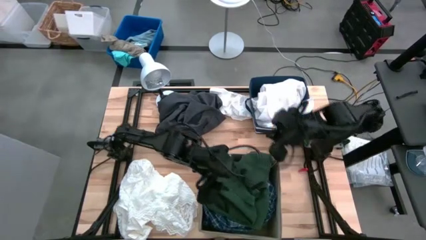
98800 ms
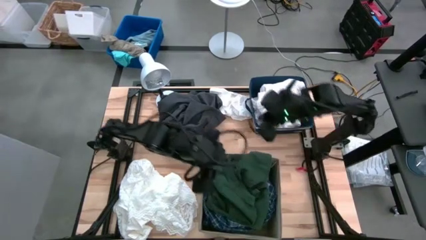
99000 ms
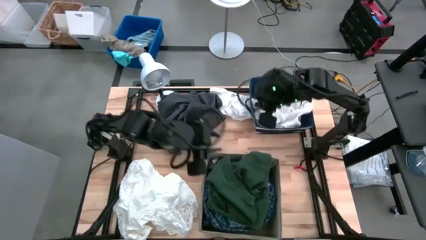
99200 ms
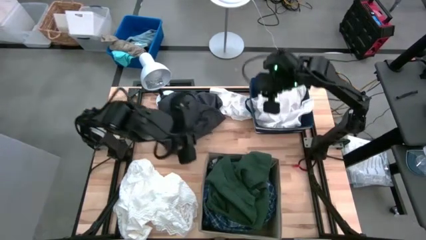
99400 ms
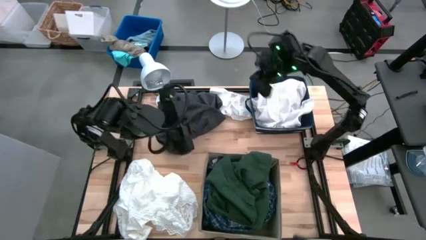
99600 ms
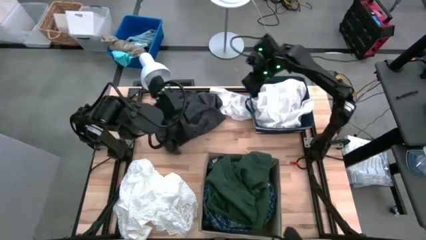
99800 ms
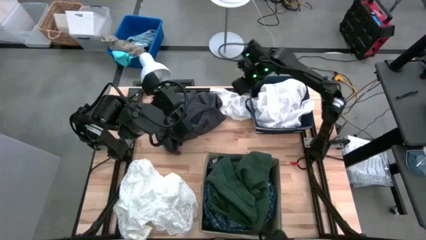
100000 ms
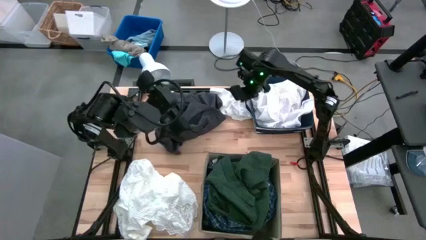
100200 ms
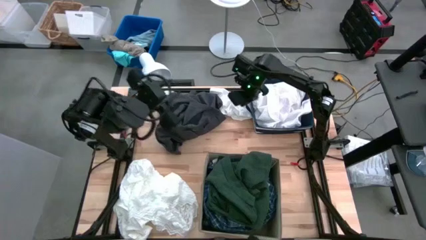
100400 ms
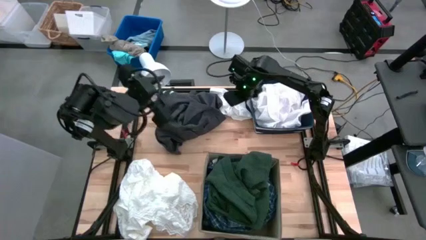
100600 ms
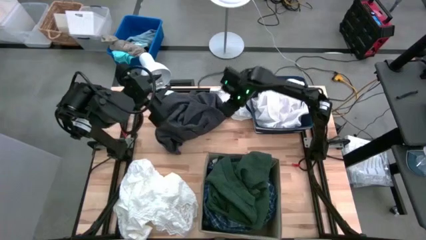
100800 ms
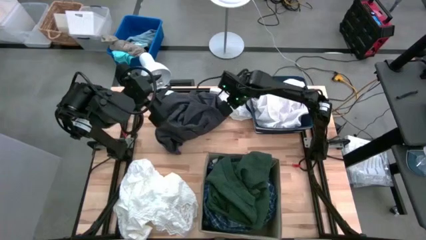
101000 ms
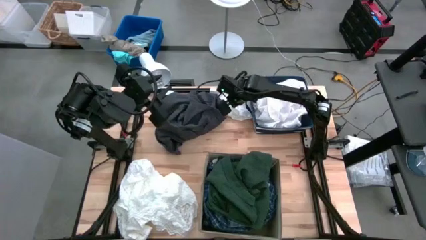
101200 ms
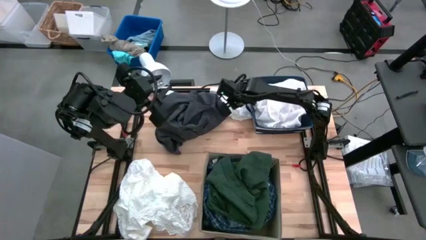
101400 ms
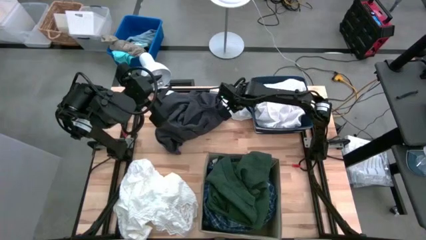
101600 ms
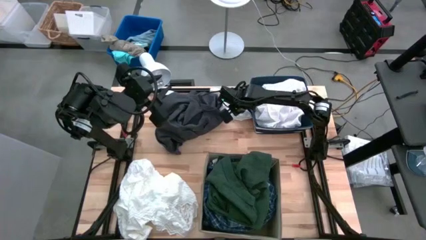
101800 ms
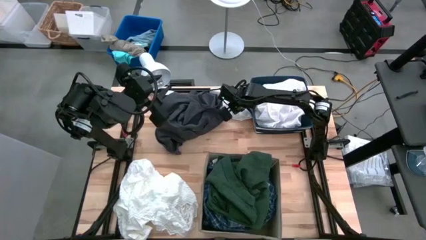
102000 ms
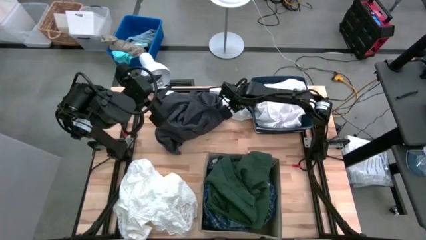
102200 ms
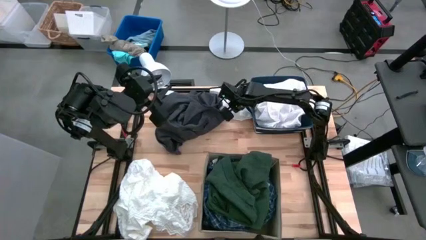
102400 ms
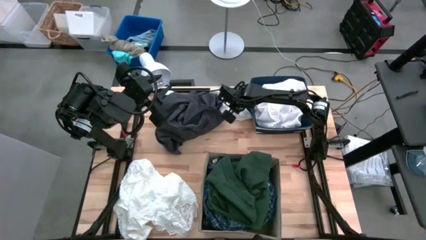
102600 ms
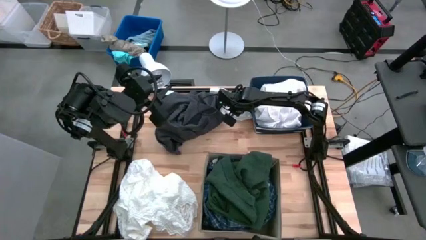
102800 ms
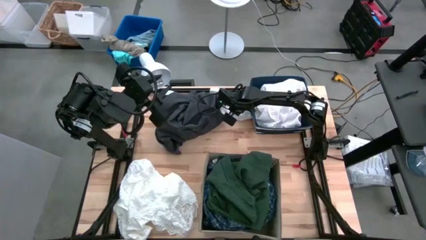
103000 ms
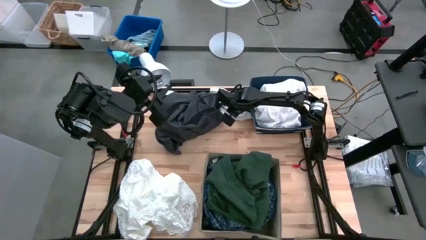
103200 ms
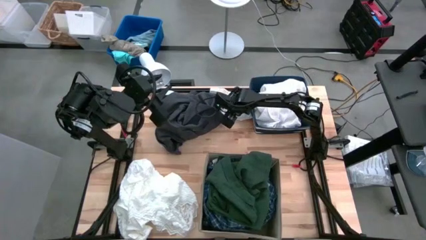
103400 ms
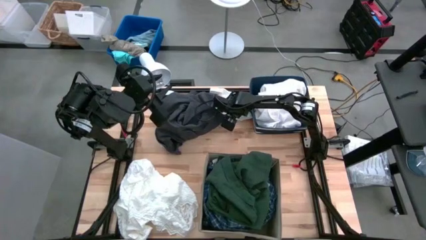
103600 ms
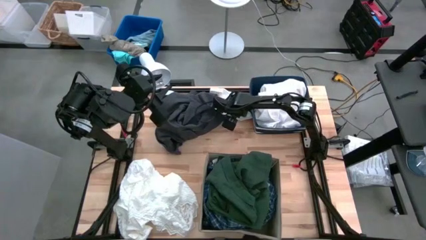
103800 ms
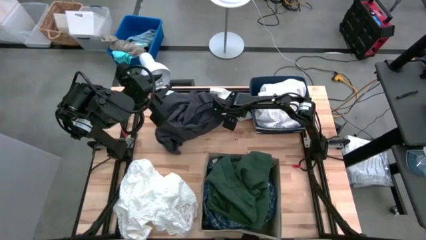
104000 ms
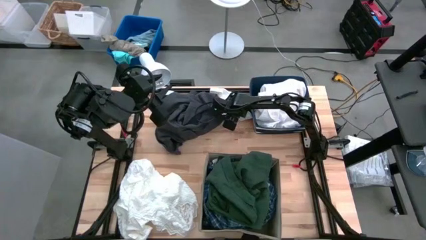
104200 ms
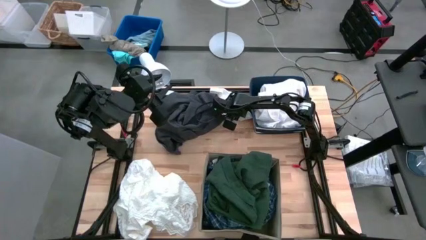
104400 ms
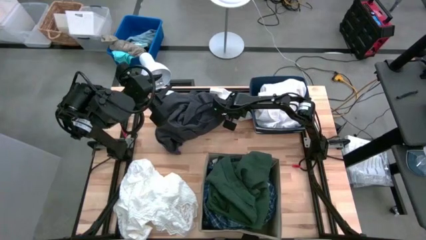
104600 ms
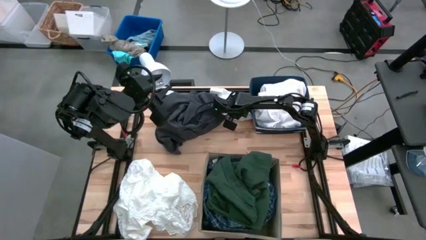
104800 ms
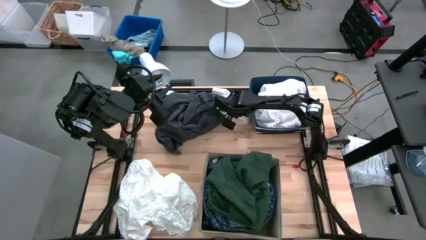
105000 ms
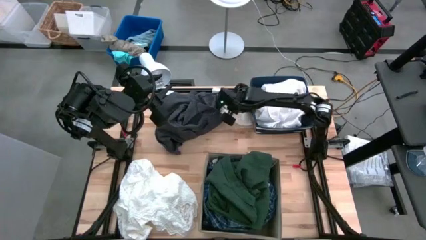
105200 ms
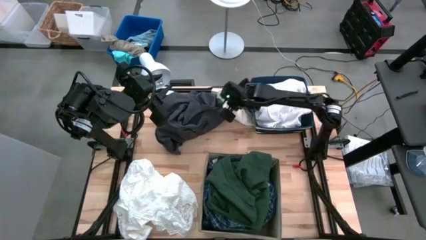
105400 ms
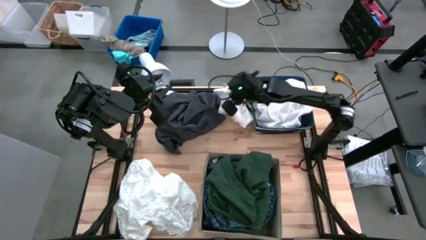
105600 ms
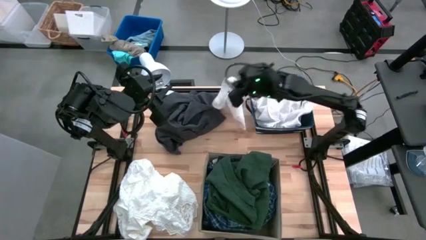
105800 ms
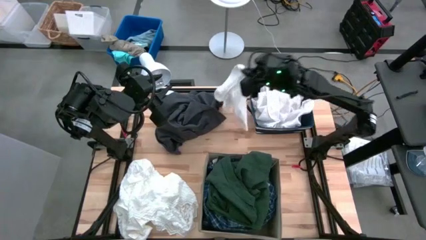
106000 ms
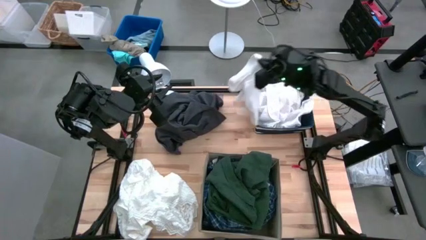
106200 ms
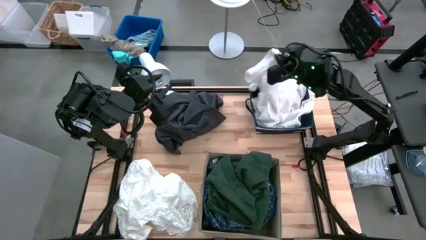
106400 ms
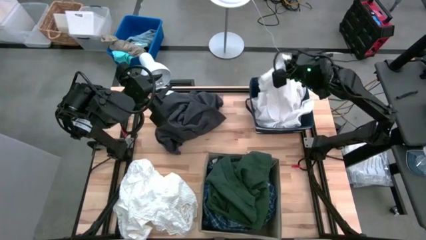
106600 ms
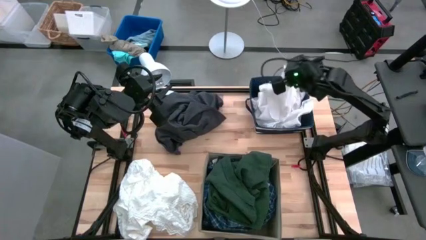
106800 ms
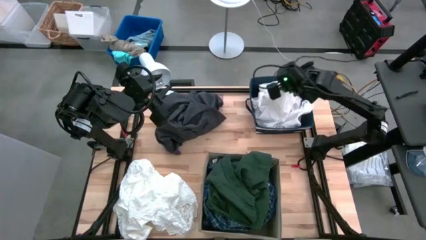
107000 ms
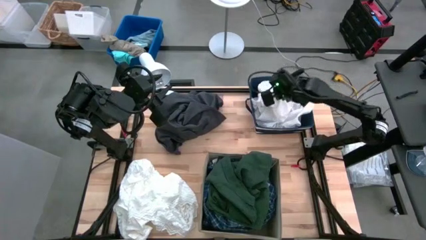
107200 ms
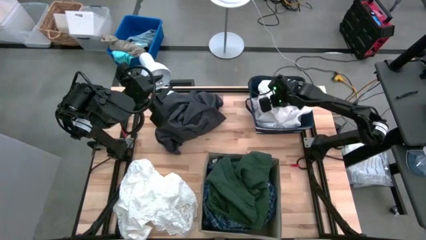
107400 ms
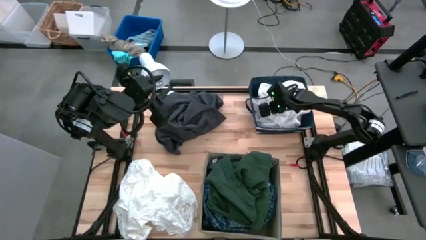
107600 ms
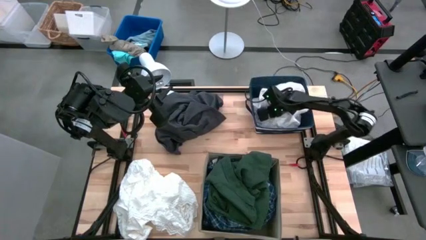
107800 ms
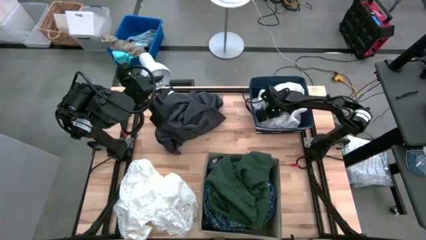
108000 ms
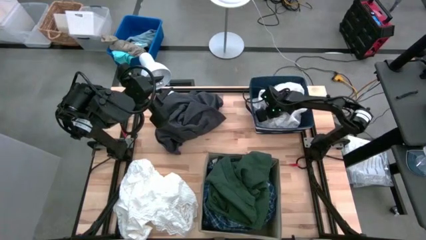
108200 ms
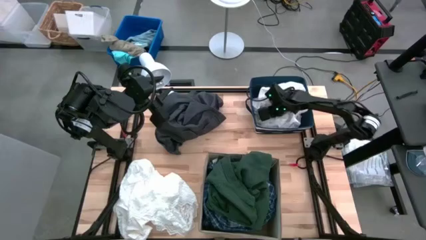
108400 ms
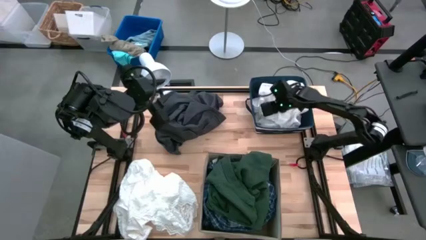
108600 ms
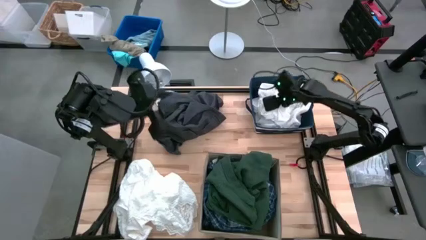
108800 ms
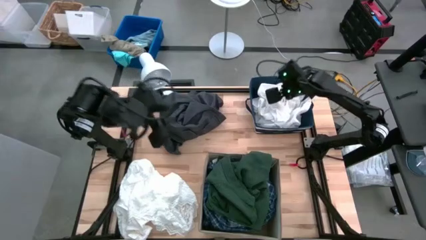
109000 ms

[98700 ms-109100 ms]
Task: Sort clothes
Put the white boxers into the blue laundry organizer

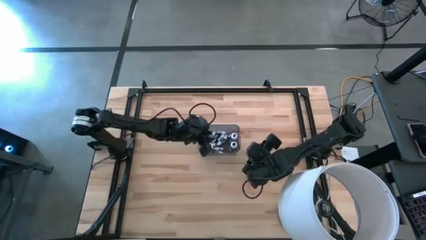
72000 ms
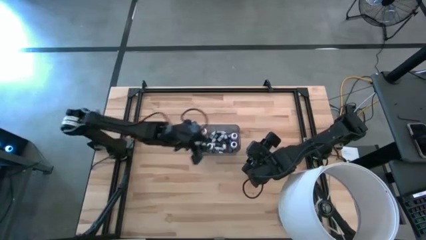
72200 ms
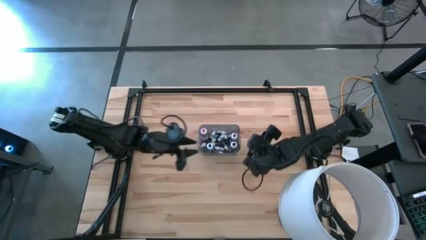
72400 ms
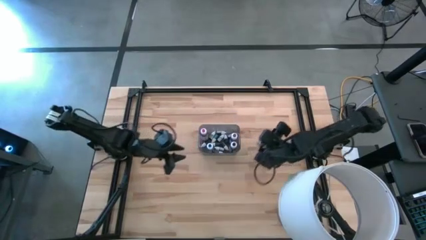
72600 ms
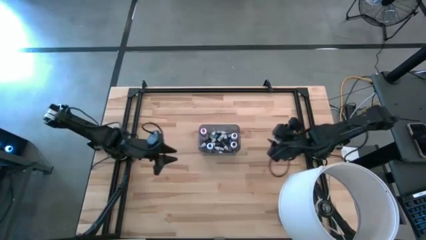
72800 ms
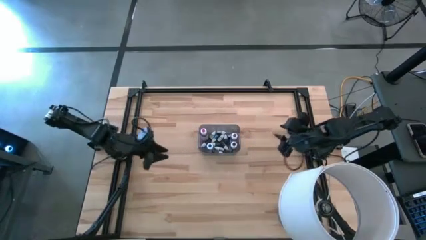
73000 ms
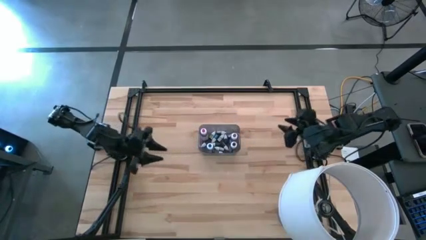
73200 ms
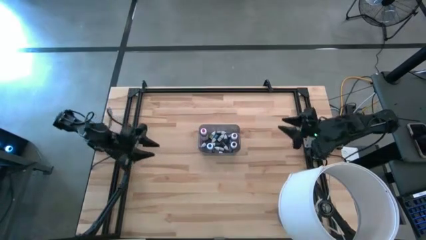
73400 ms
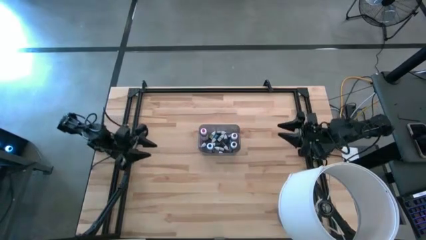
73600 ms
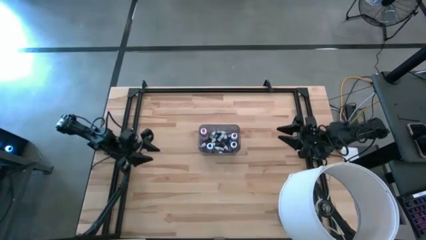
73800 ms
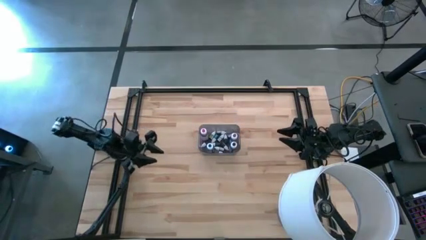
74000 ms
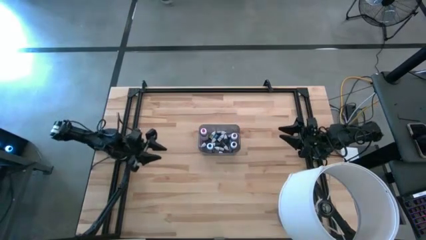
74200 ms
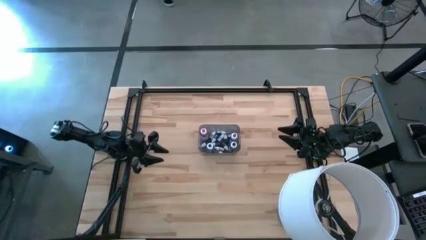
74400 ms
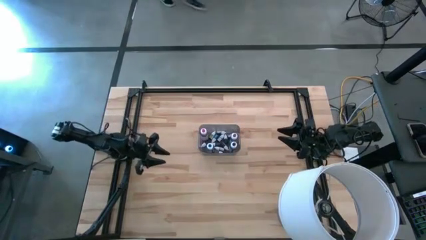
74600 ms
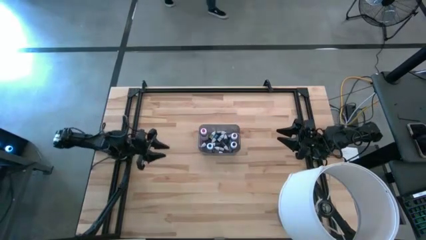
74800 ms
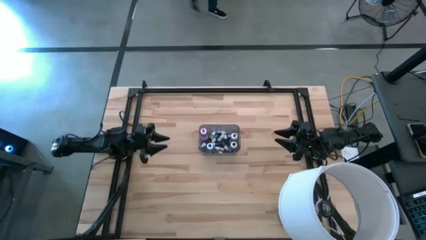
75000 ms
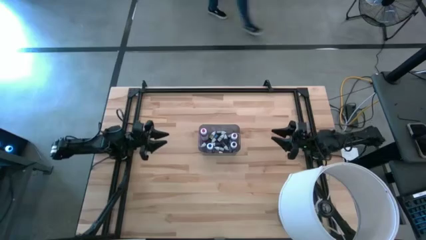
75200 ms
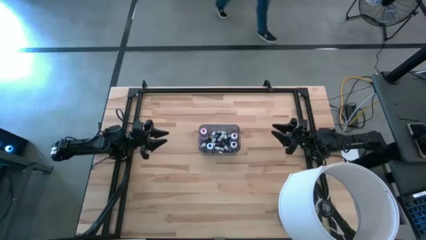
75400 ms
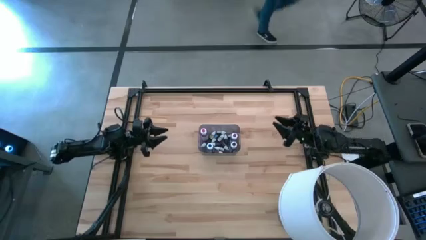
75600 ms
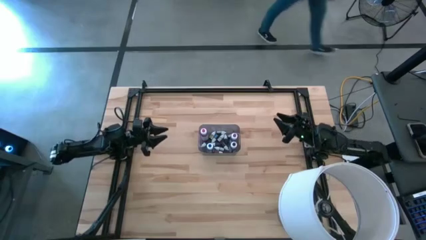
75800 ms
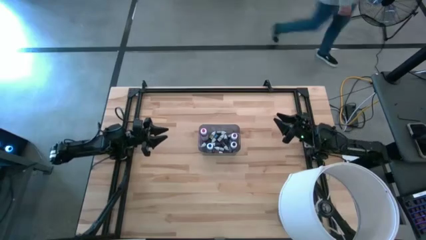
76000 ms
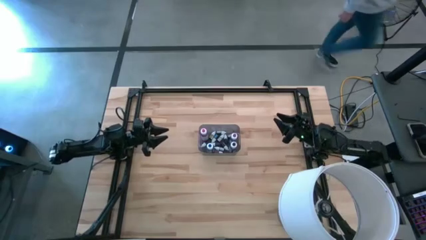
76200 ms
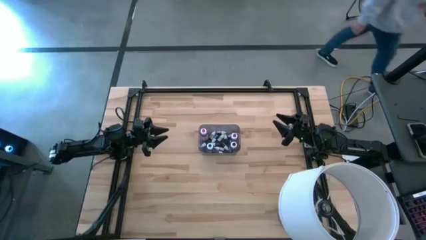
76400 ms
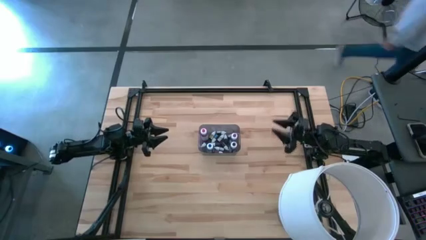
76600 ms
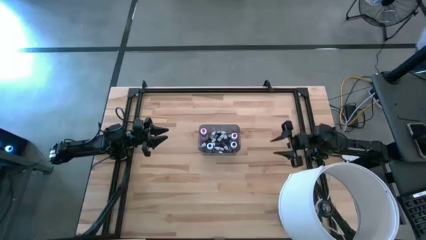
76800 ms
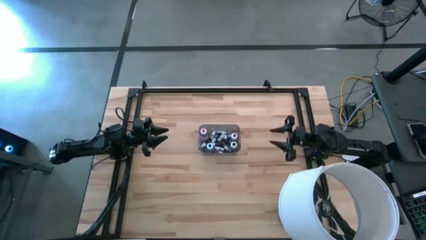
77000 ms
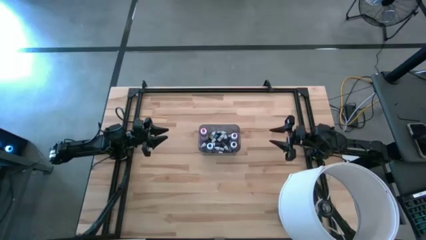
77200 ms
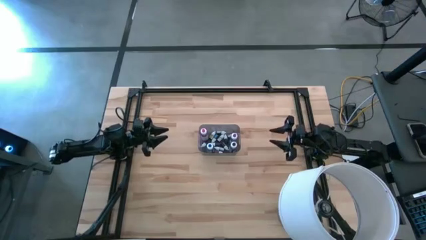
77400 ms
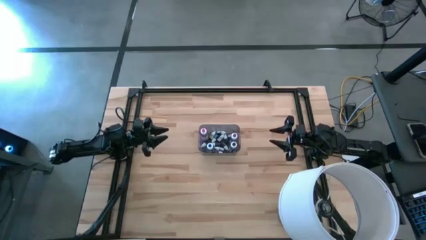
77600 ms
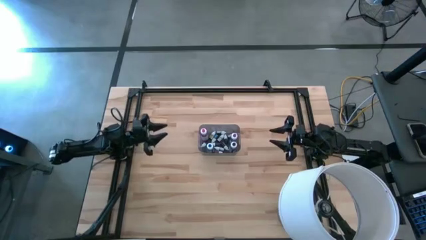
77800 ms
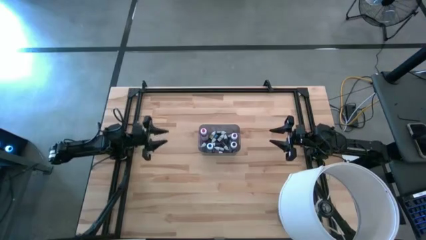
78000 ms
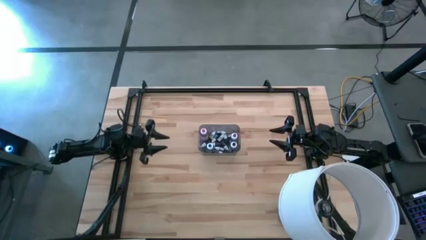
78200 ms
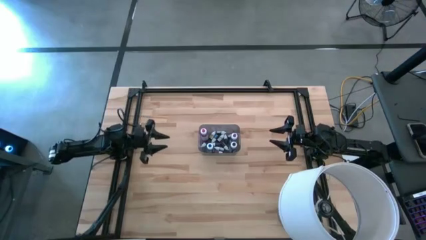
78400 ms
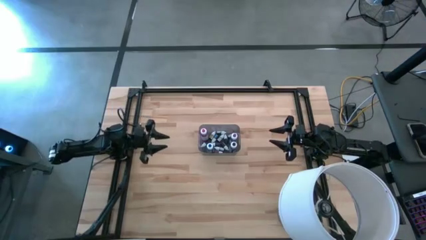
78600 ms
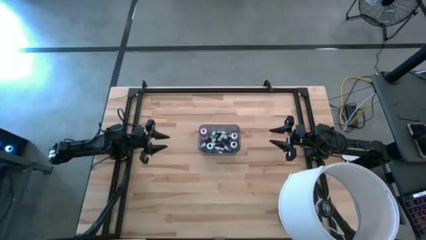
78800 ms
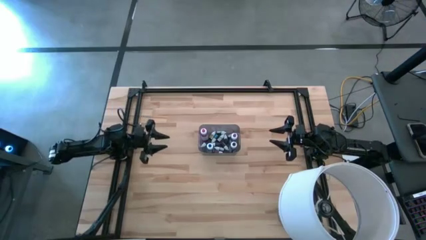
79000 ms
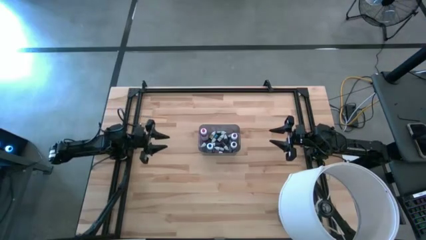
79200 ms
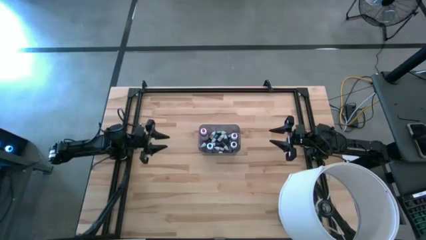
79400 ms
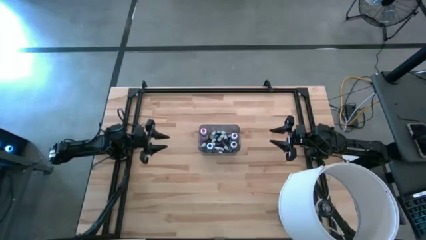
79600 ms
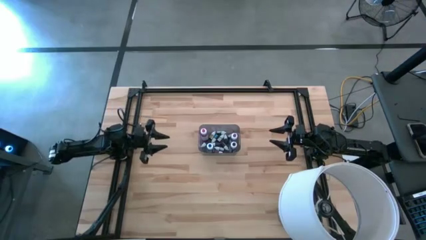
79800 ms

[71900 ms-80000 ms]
Task: Pick & Place food coloring
Return to Home Position
